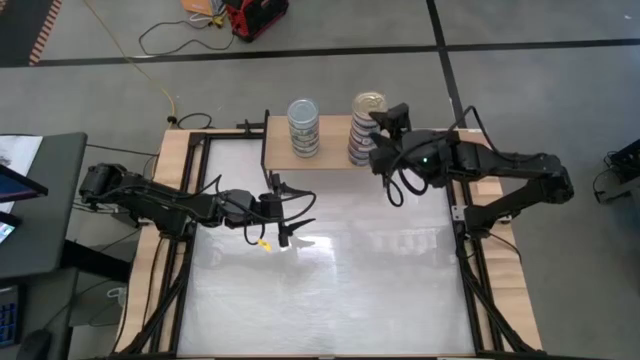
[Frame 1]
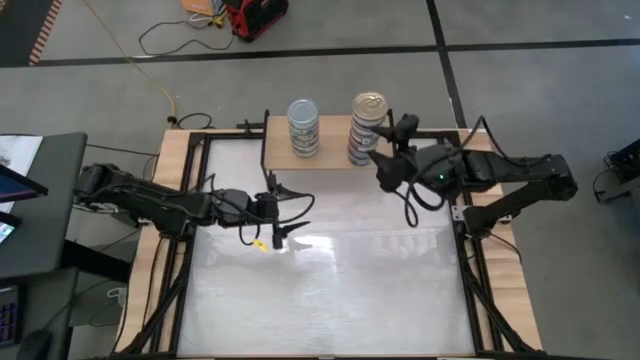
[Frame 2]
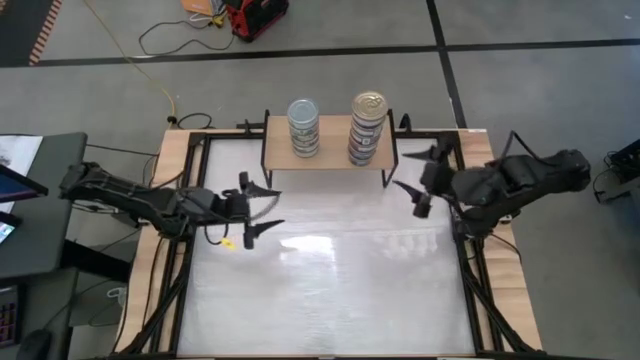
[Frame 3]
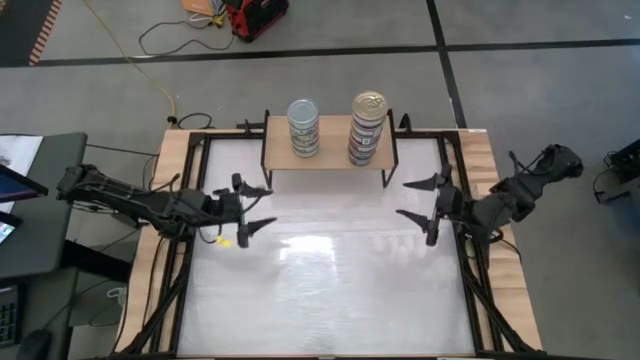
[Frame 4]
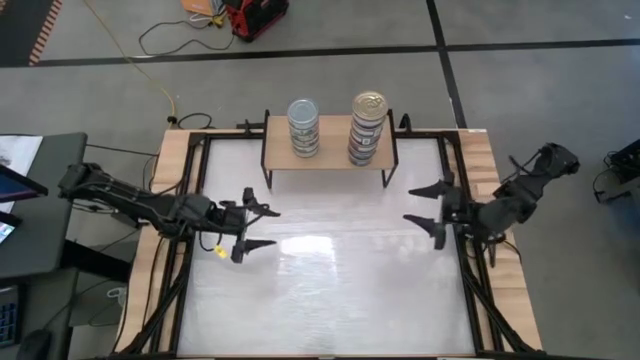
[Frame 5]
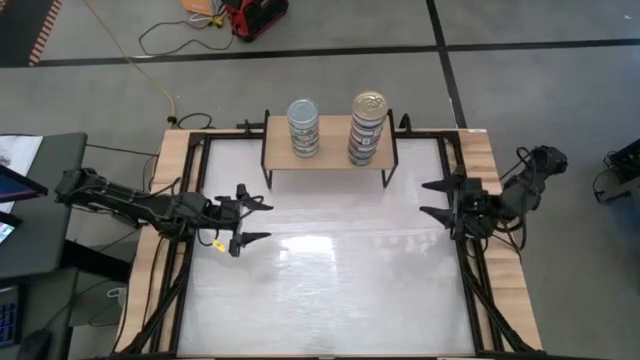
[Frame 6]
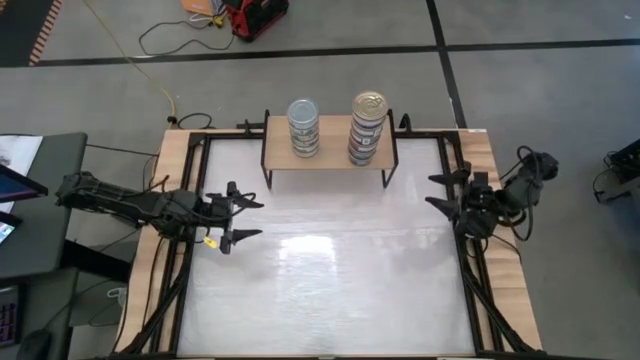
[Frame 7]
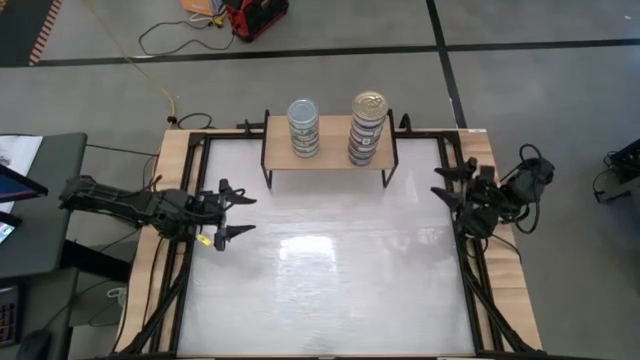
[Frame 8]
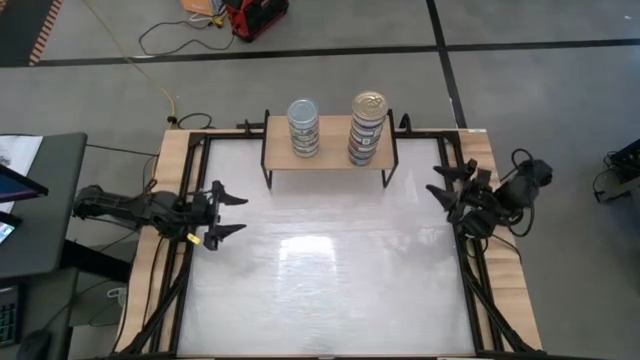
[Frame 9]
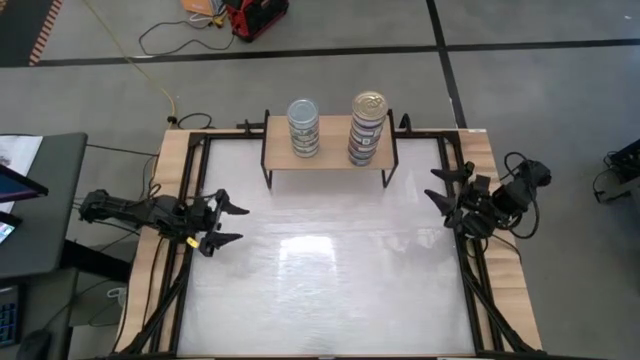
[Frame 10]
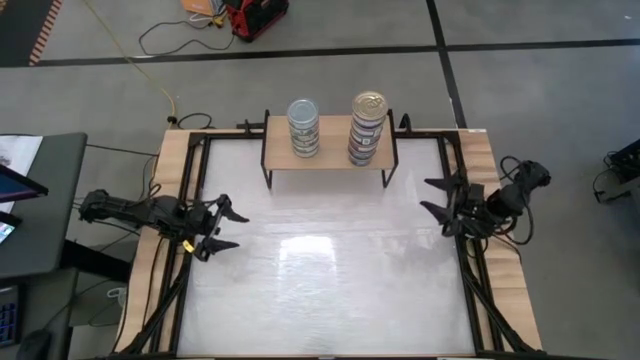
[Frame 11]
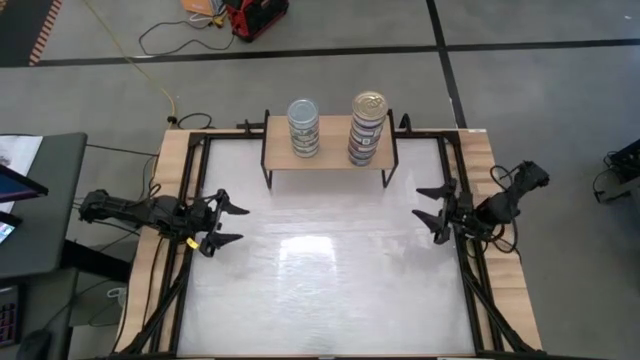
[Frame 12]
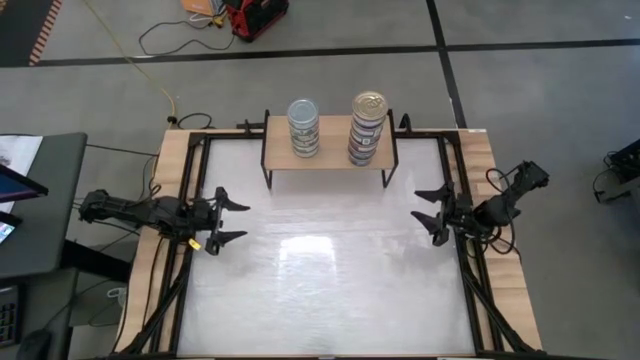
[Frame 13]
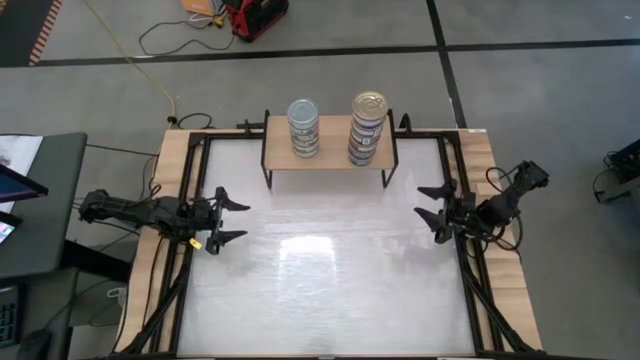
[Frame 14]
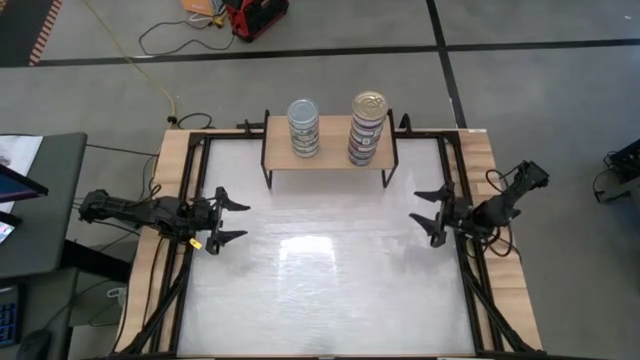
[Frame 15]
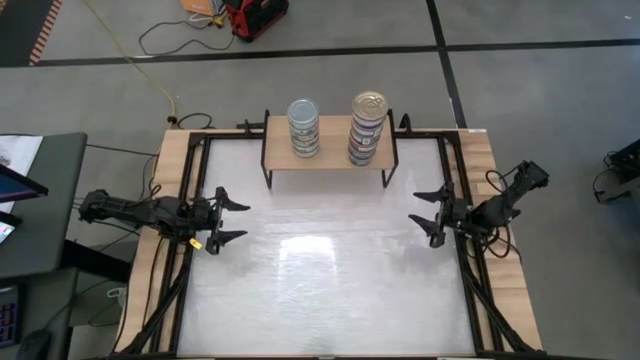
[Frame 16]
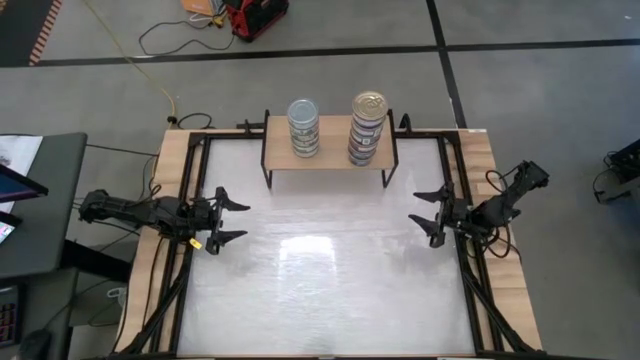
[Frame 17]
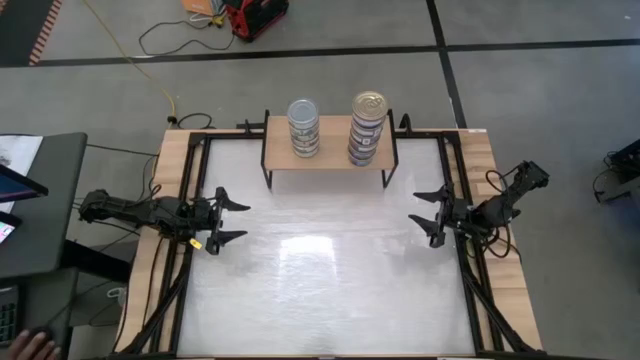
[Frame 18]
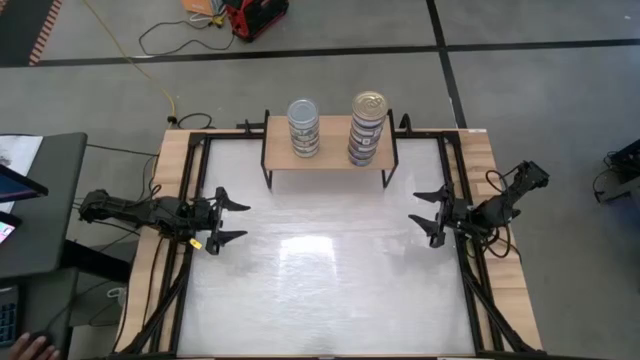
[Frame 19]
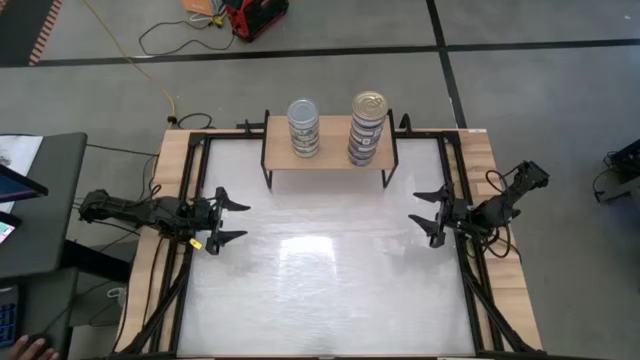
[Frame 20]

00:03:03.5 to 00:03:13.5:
Task: Stack canned seafood by type on shelf
Return to Home Position

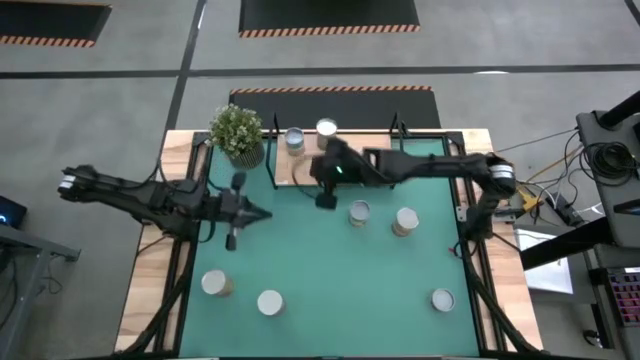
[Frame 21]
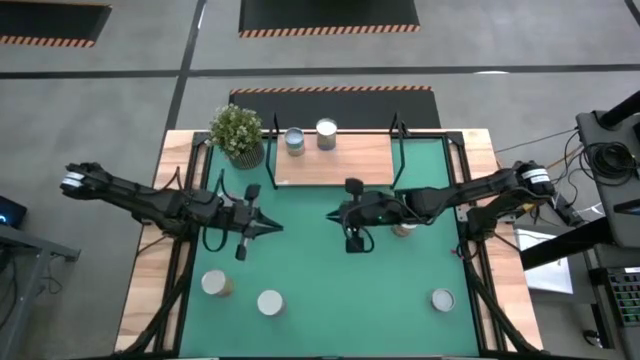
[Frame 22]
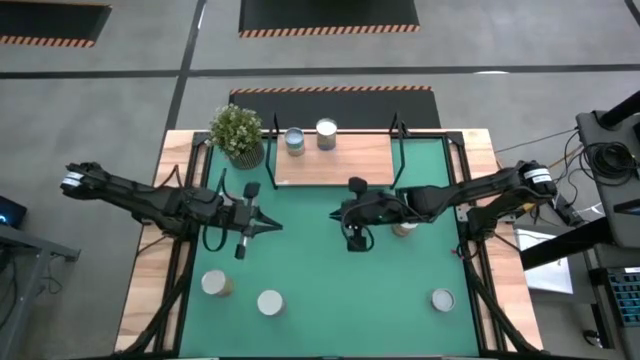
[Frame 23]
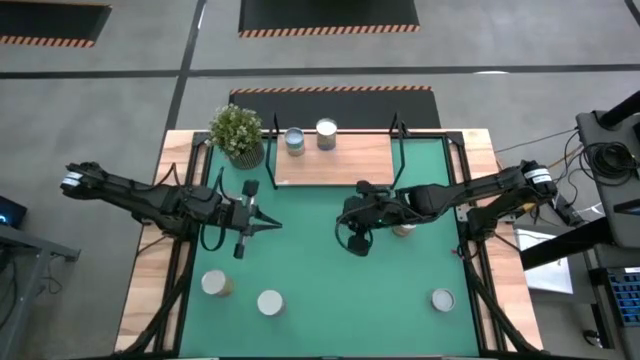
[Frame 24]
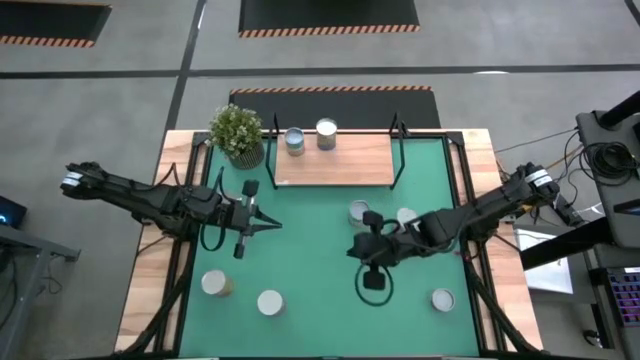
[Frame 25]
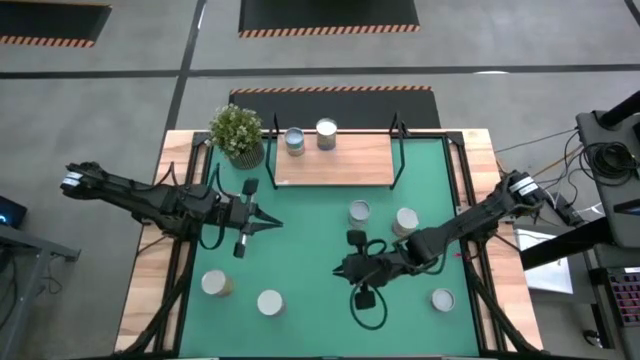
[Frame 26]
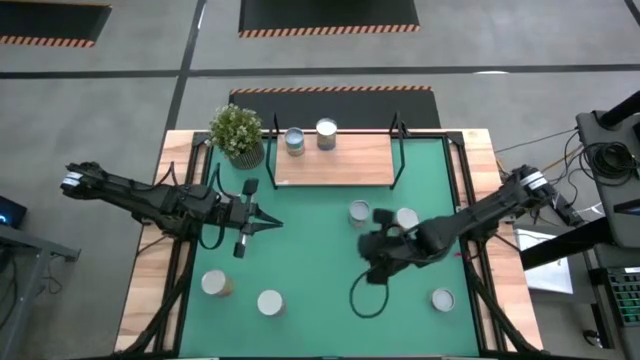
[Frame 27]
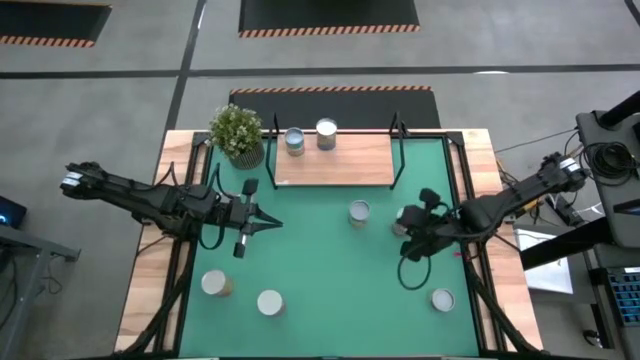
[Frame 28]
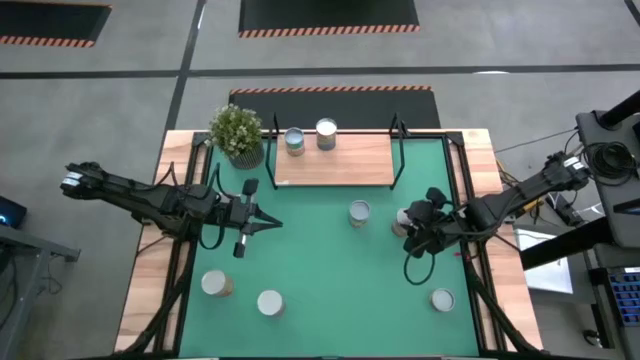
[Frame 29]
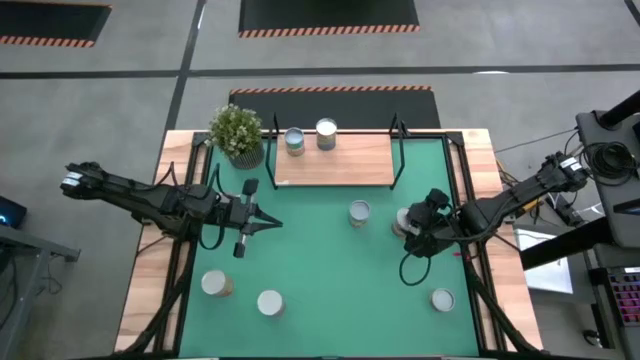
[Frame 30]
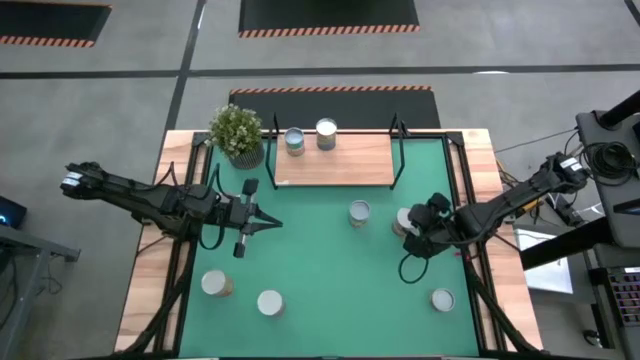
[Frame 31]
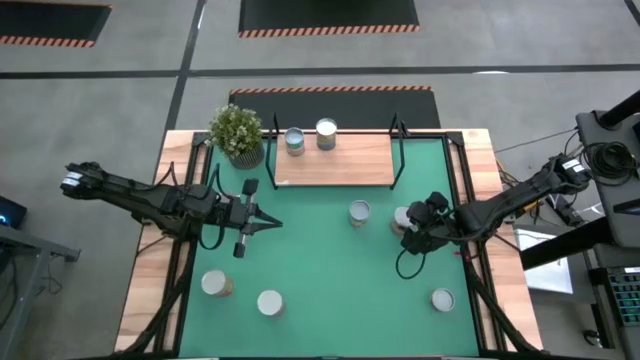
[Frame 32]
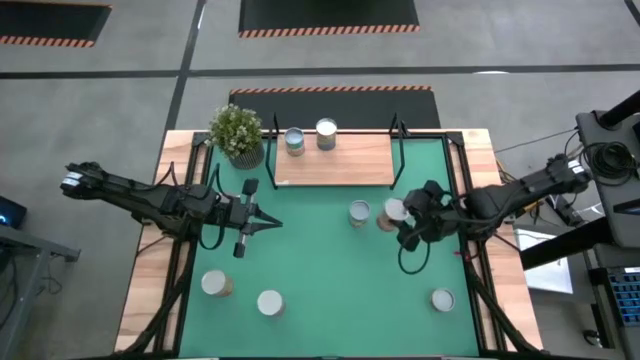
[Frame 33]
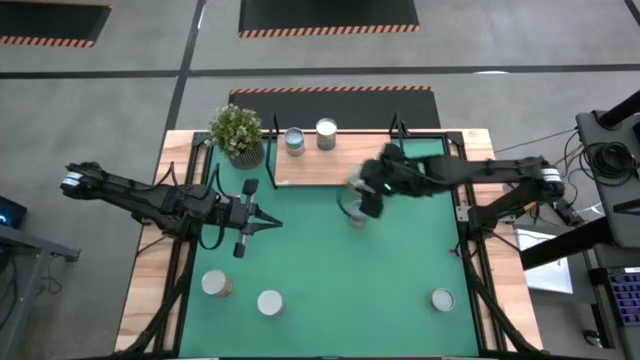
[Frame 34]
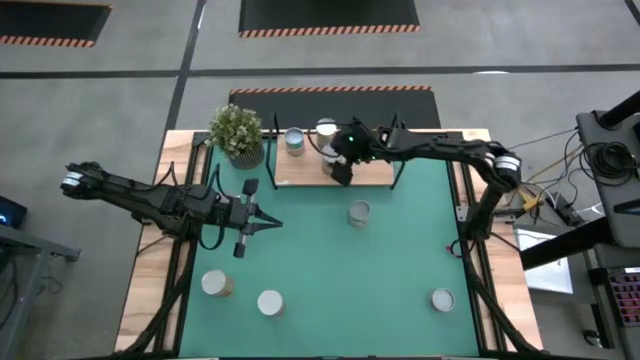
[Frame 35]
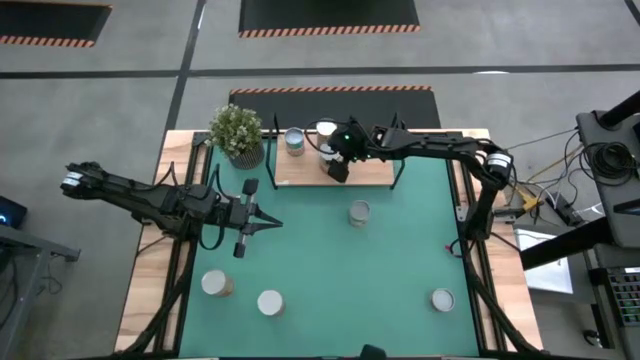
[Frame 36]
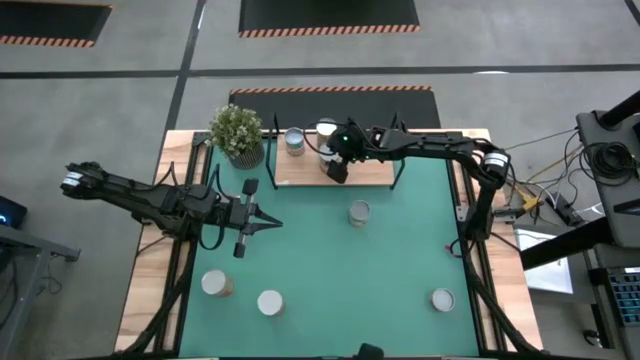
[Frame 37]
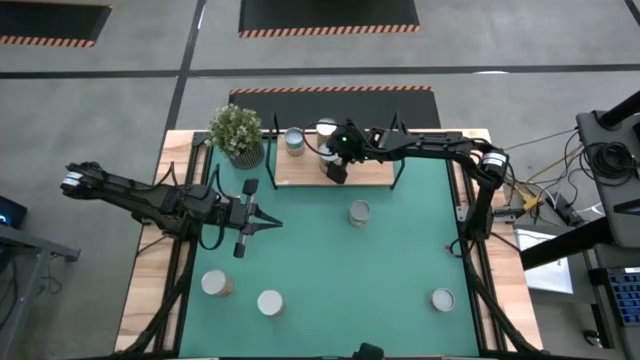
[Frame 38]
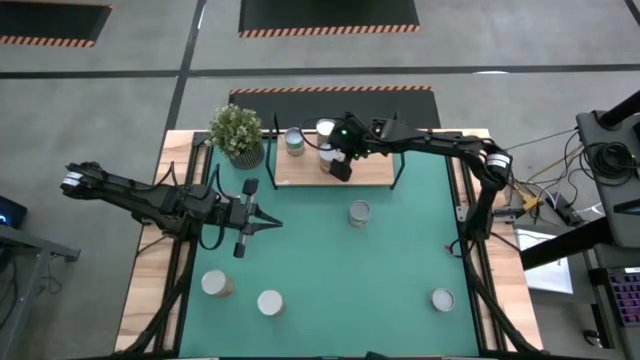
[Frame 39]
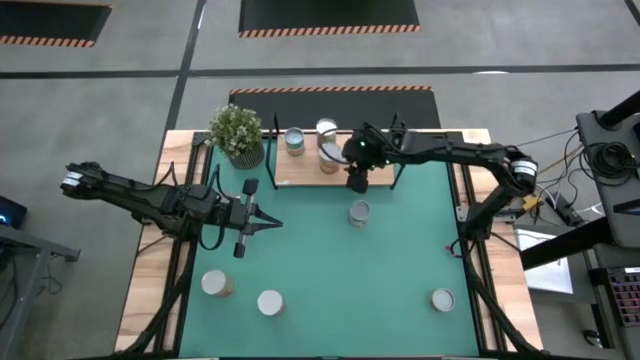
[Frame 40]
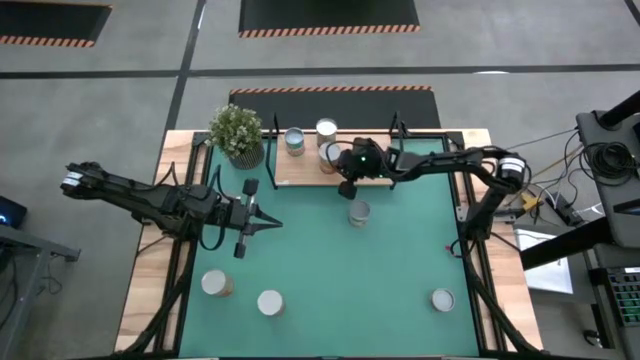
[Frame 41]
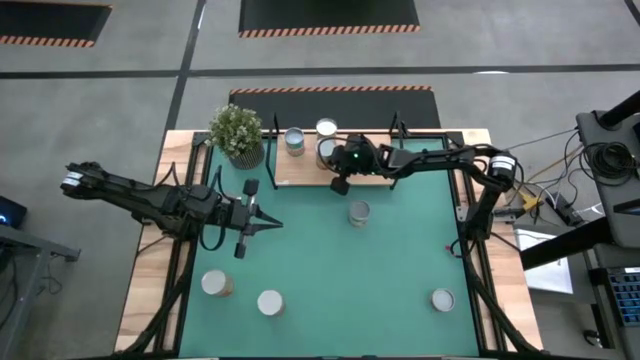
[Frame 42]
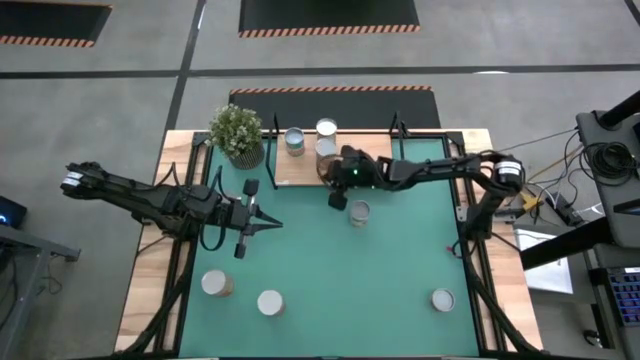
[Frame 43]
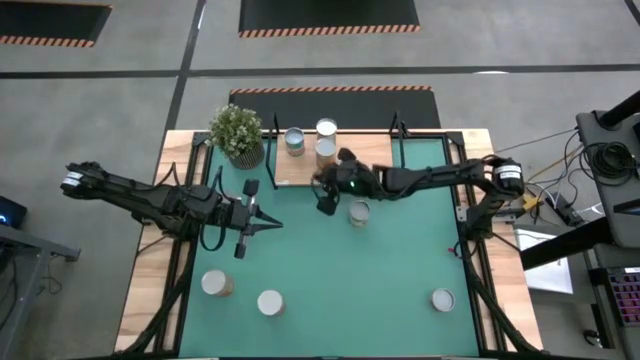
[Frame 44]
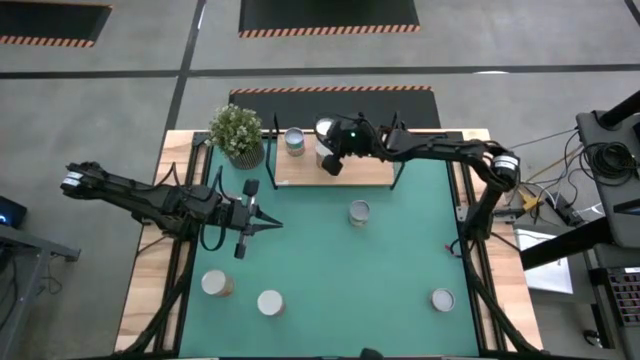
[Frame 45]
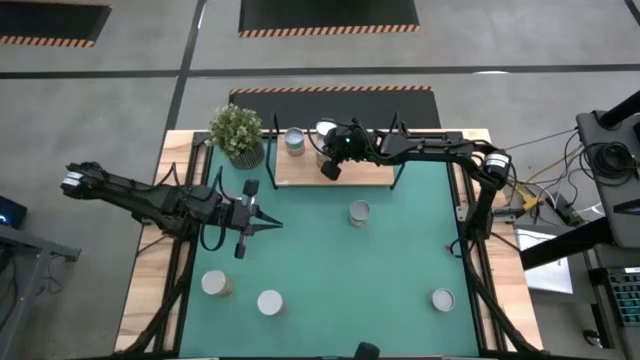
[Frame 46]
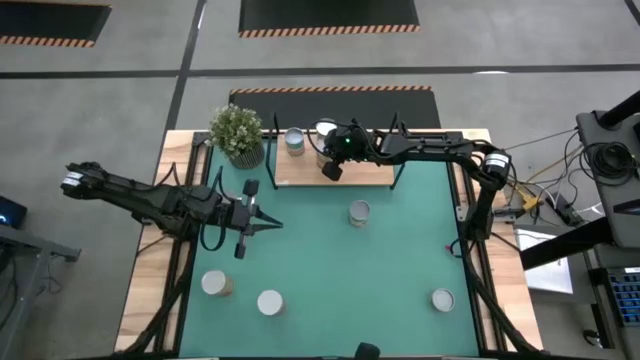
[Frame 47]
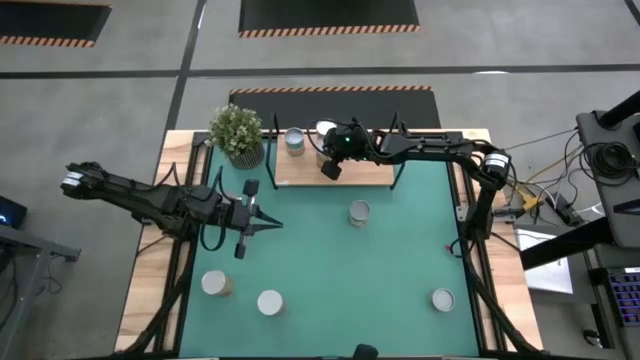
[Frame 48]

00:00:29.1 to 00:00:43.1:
Task: Pick and place cans onto a shelf
Put the right canned corn on the shelf
